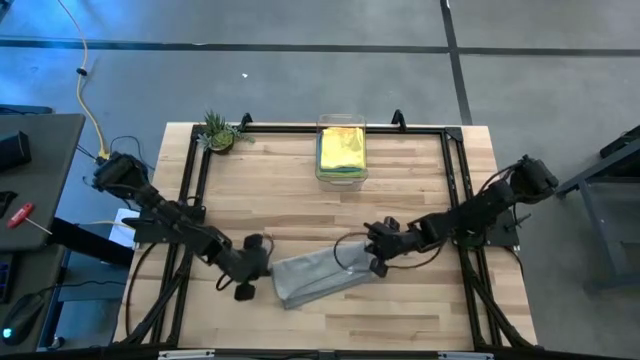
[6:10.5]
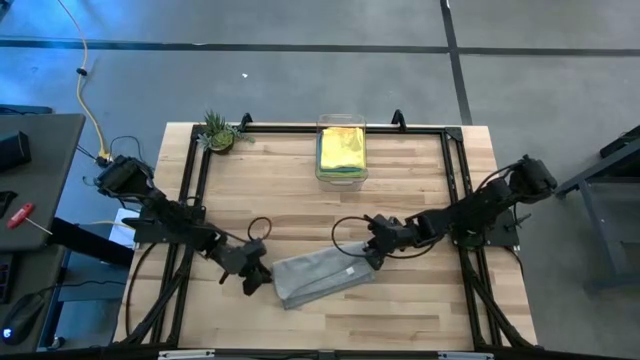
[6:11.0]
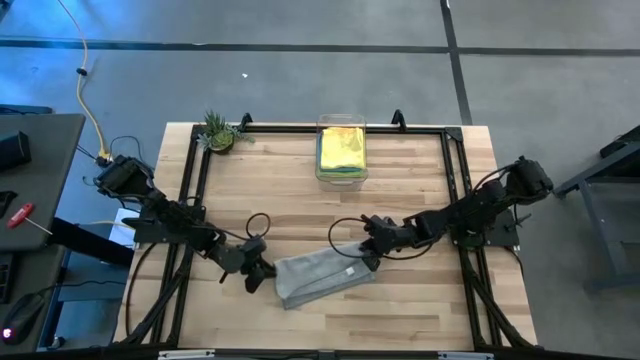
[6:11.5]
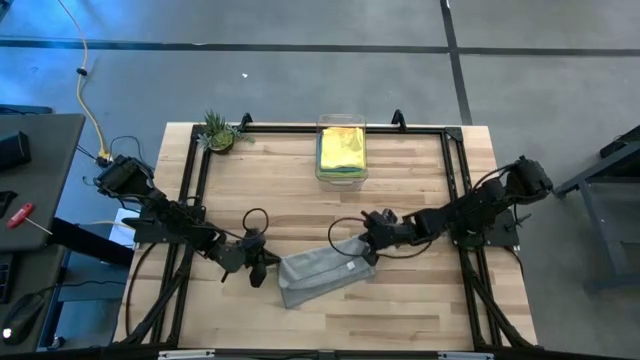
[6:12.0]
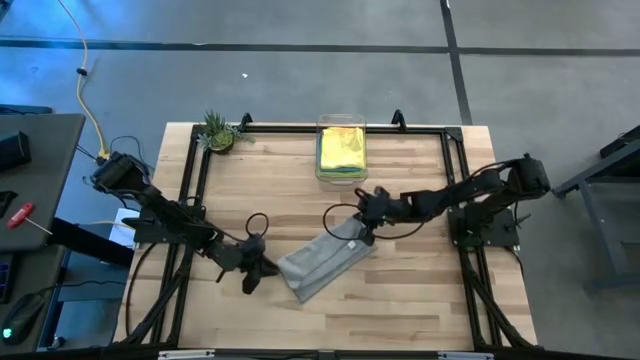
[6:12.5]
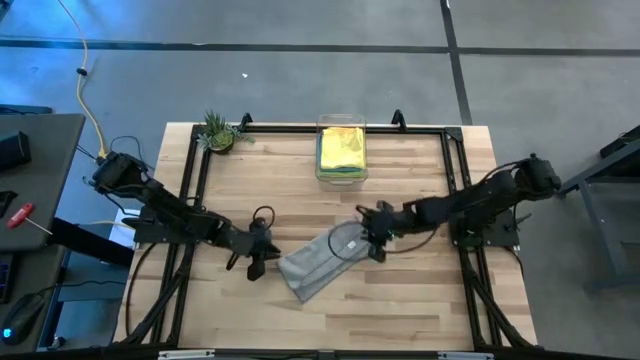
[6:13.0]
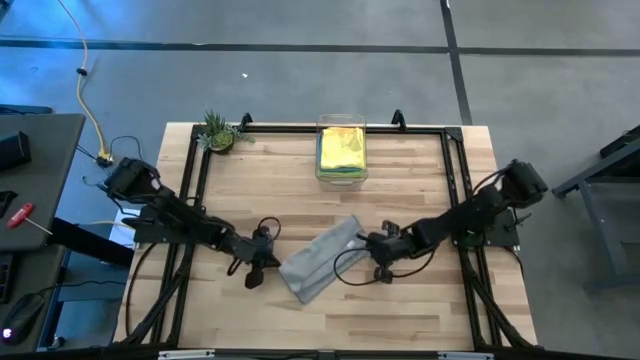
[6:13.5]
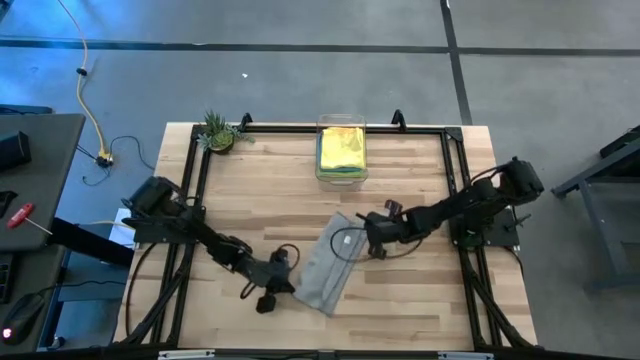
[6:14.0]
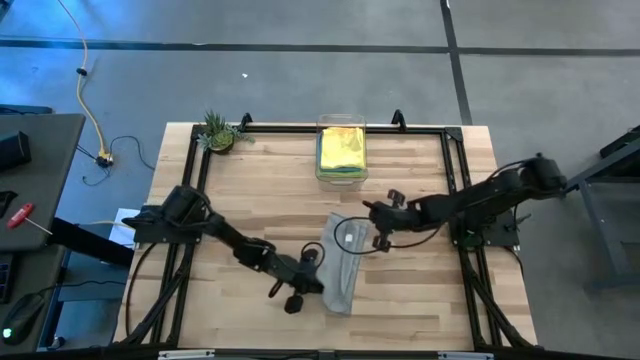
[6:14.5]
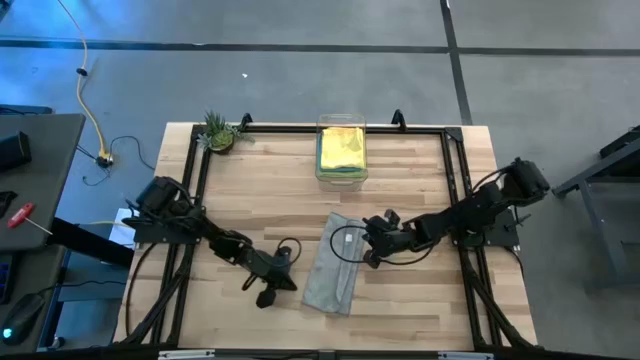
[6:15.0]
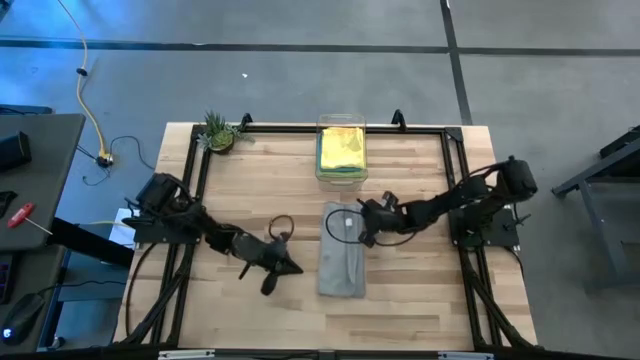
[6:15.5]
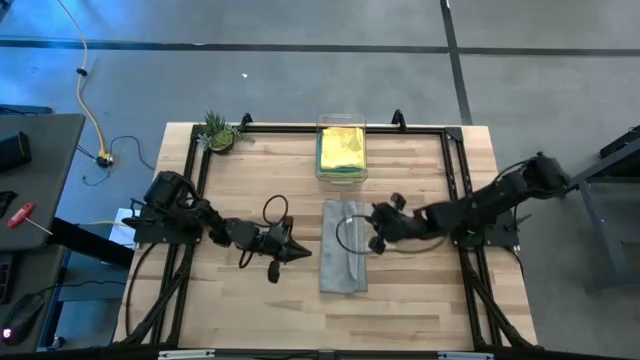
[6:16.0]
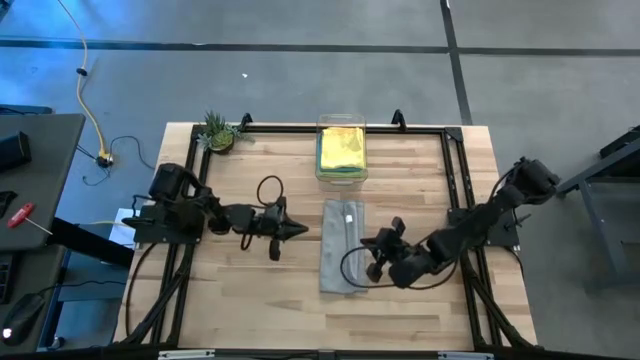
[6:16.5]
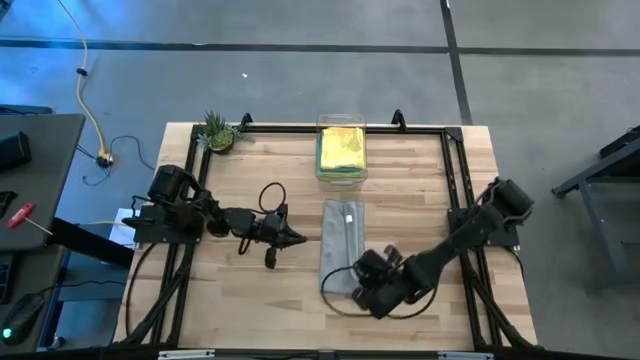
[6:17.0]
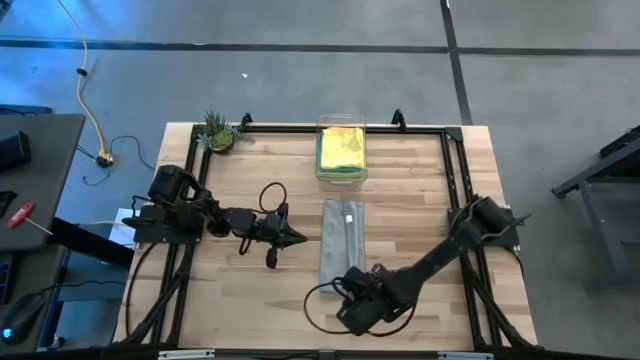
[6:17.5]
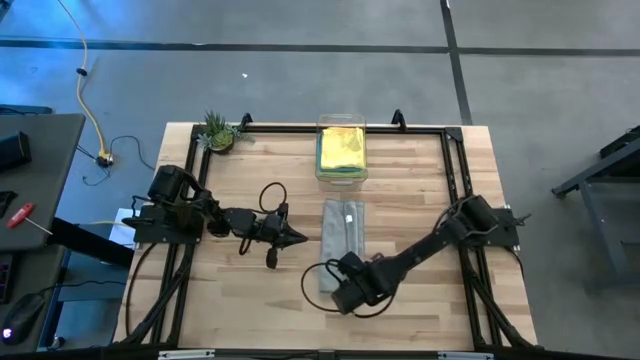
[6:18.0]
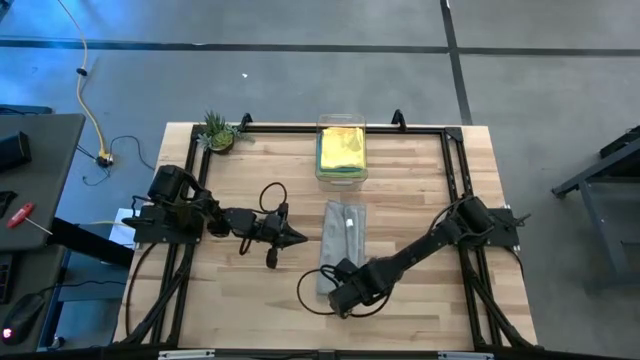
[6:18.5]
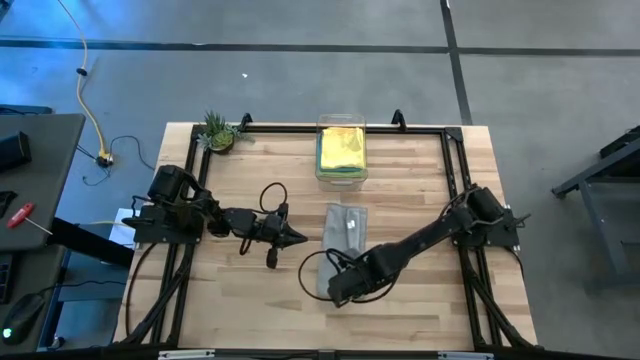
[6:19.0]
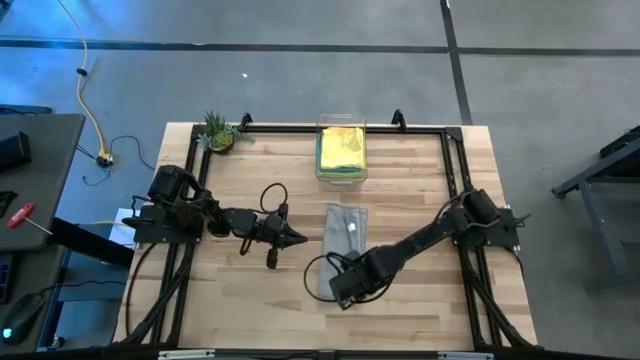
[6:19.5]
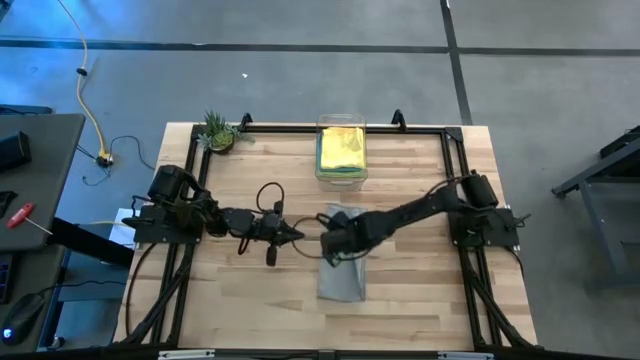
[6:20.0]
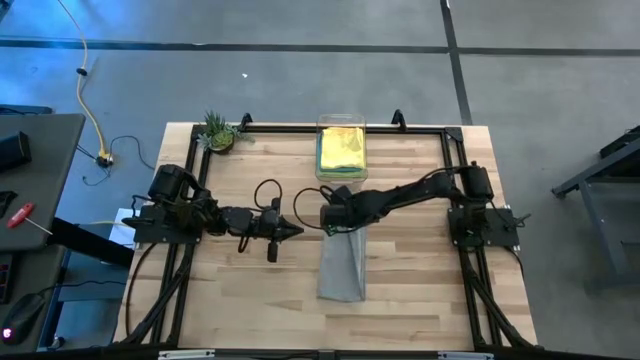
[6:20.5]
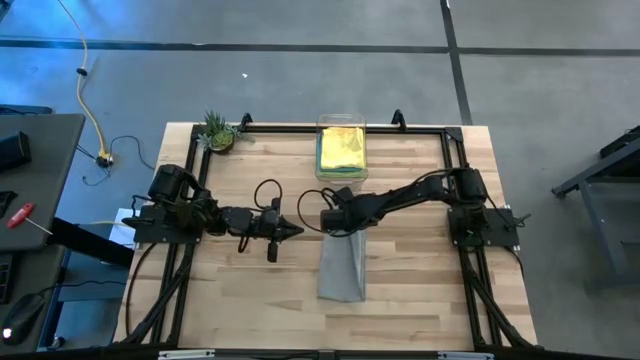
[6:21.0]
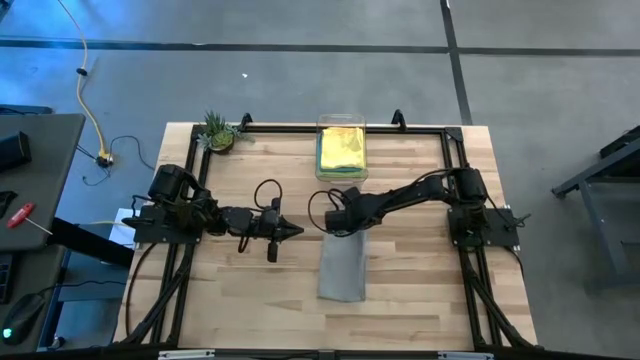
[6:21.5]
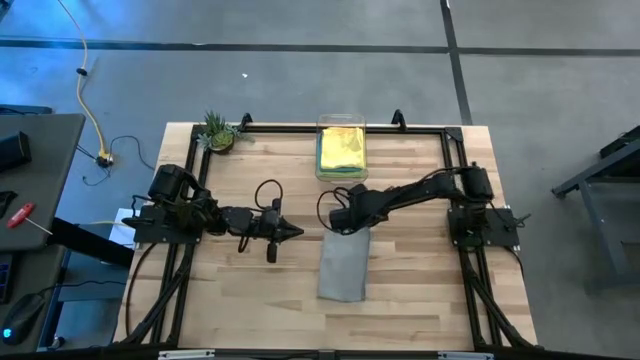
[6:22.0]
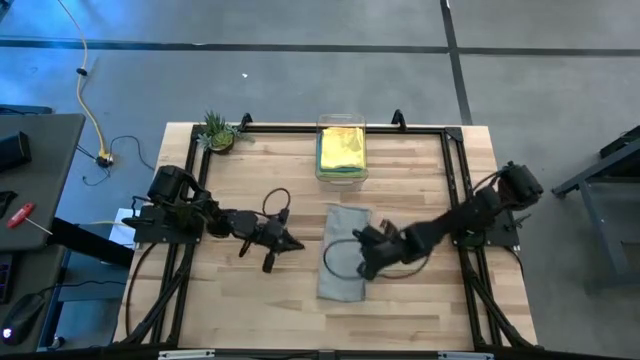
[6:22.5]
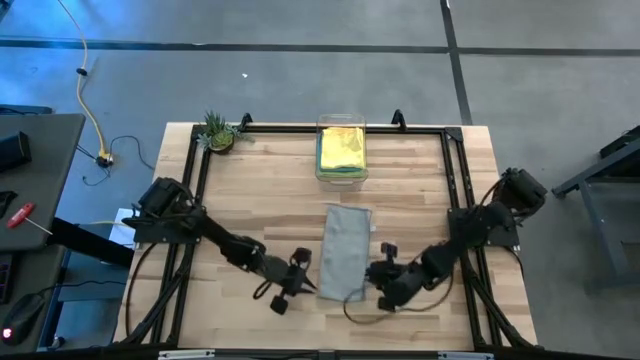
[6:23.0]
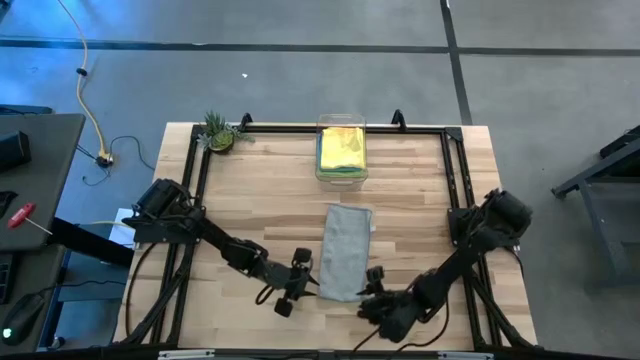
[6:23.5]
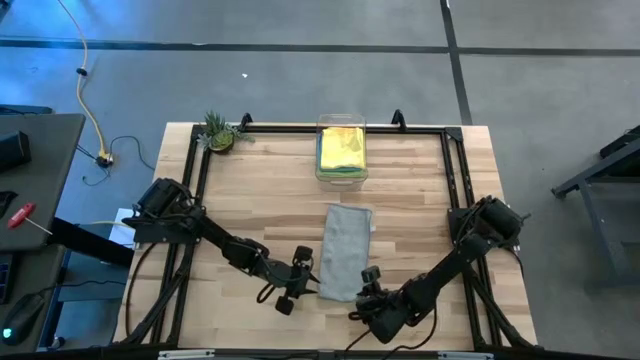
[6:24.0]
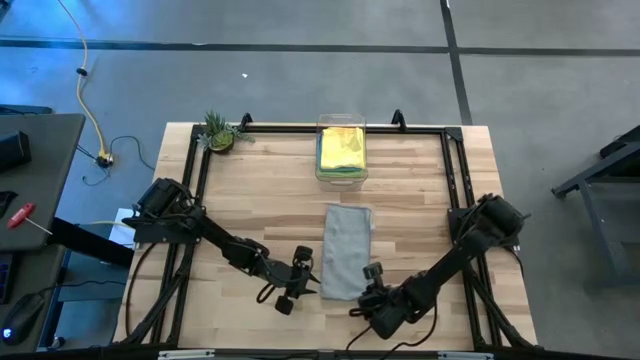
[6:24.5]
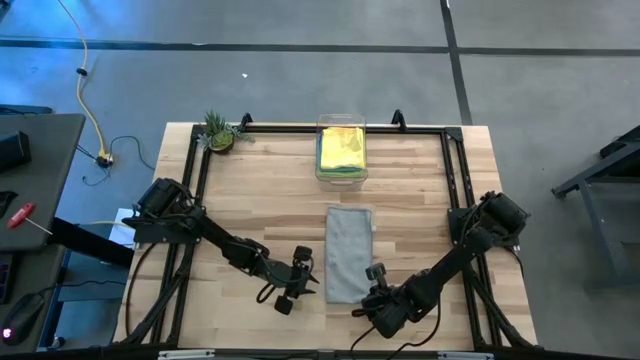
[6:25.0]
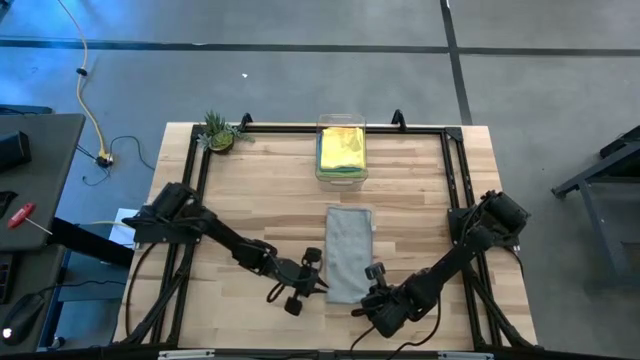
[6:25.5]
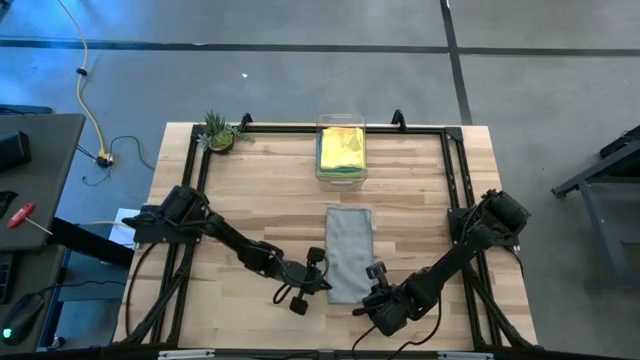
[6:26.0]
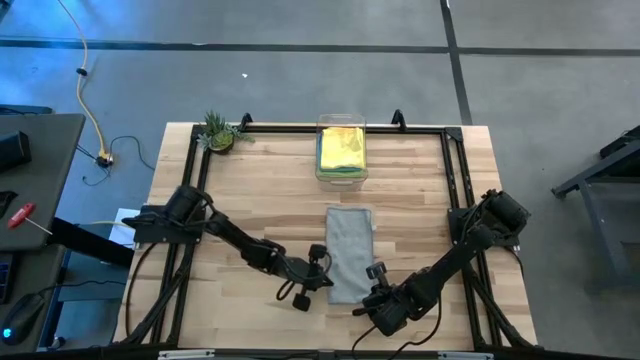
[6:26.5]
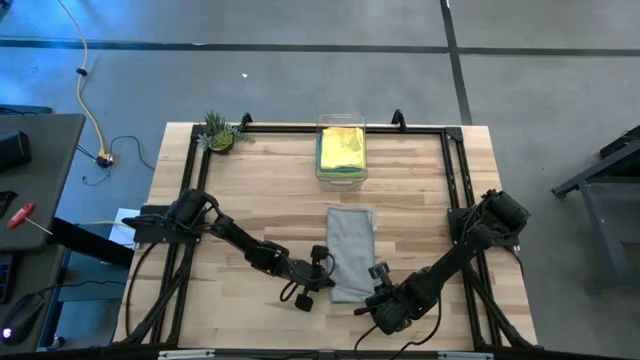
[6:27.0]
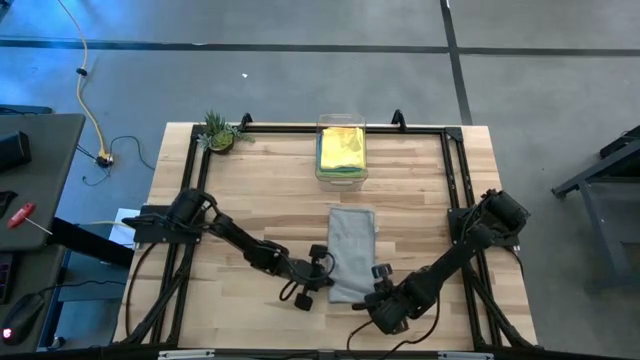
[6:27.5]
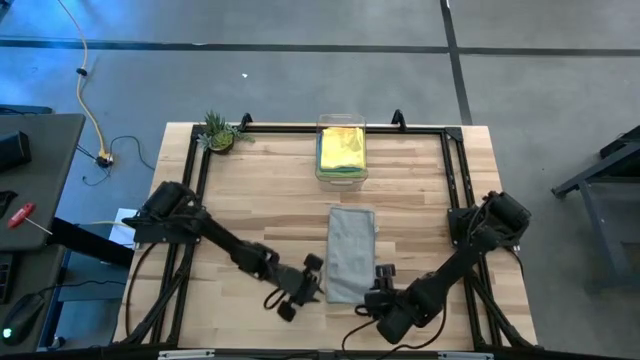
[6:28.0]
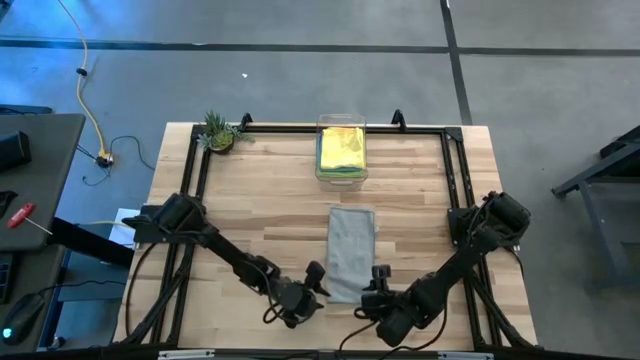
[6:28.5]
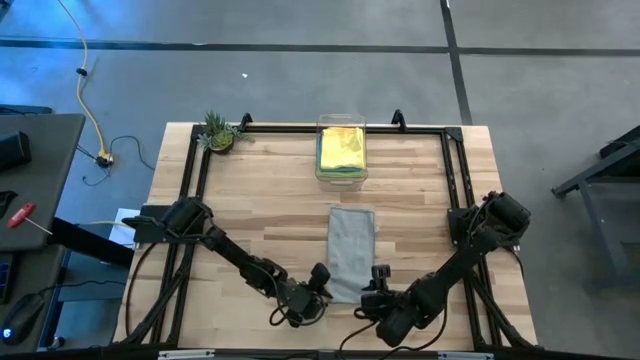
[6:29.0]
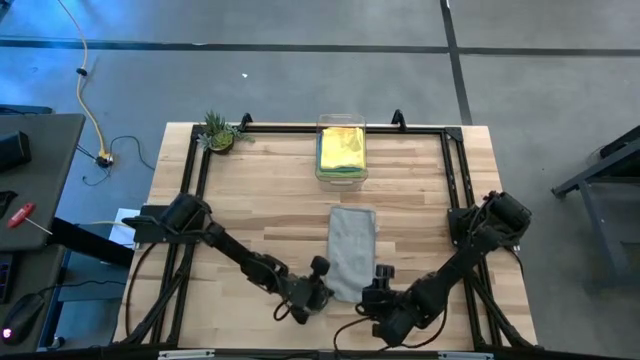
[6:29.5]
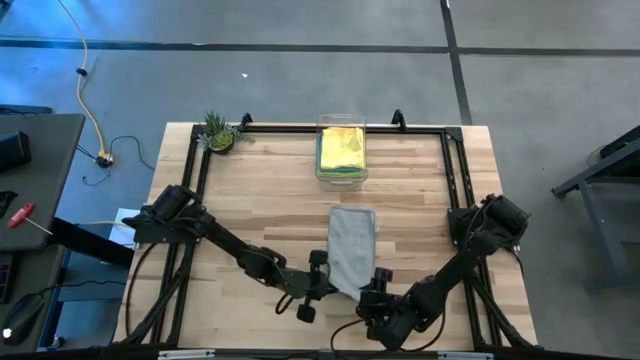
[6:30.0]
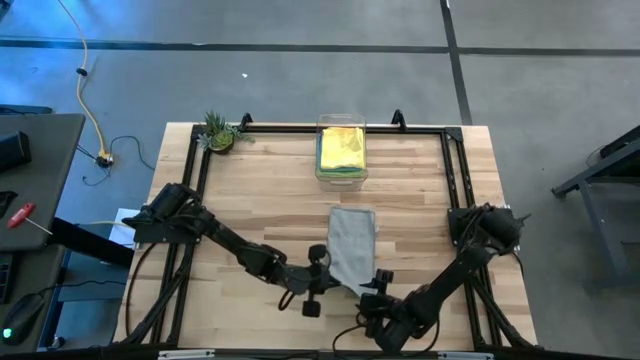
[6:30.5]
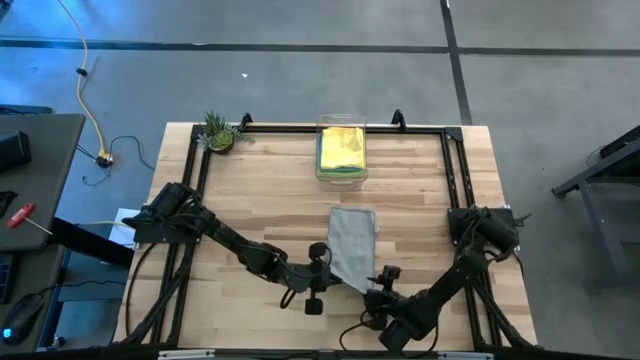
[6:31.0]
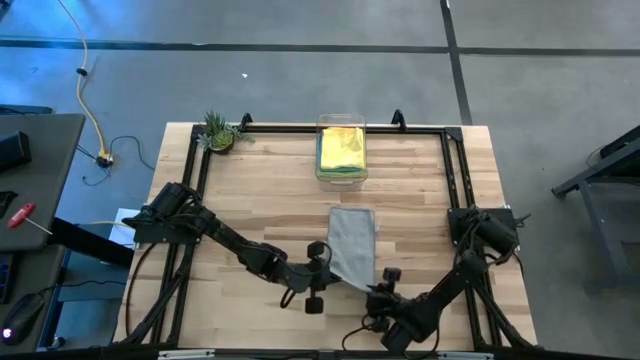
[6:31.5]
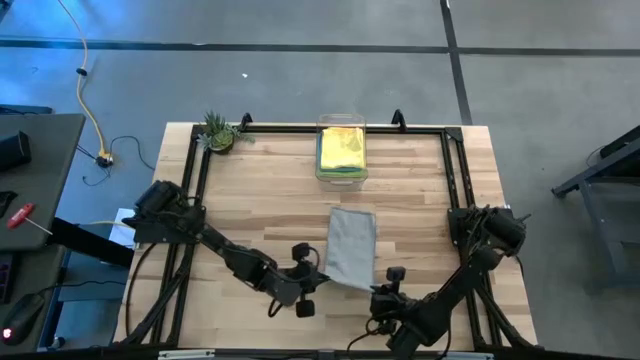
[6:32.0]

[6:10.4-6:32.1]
Task: Fold microfiber towels
Fold the gray microfiber cloth
